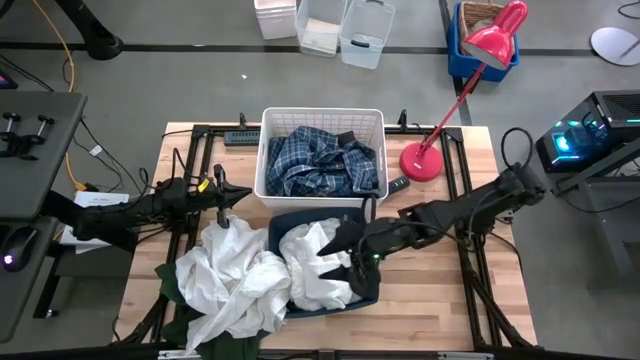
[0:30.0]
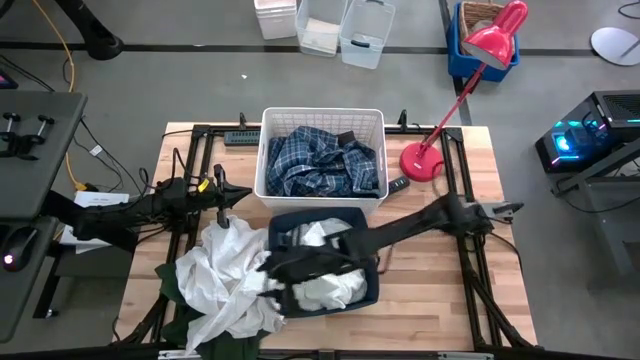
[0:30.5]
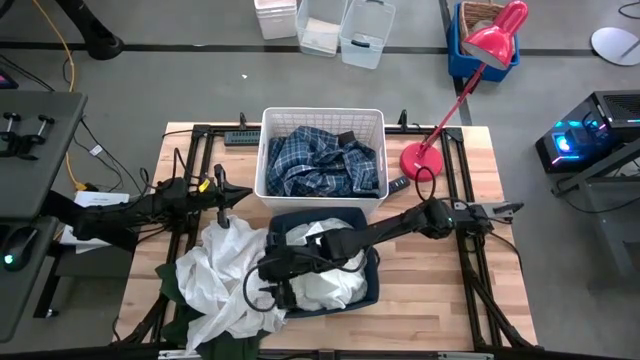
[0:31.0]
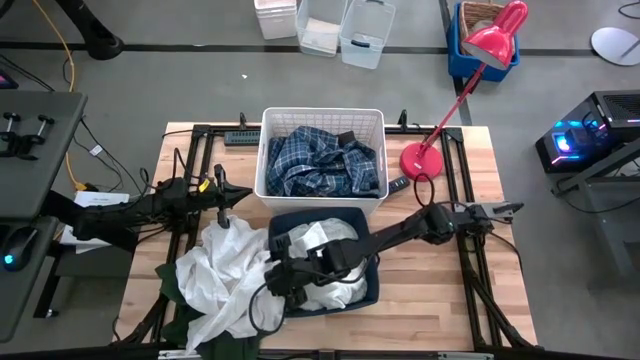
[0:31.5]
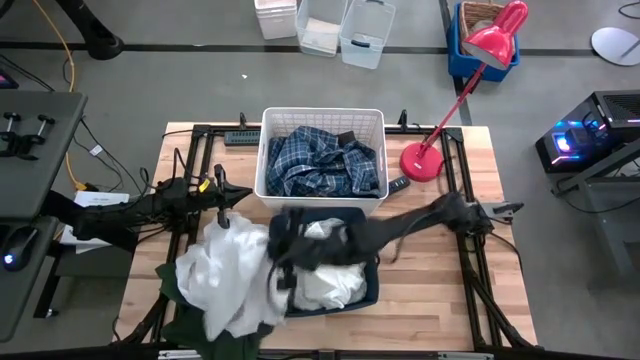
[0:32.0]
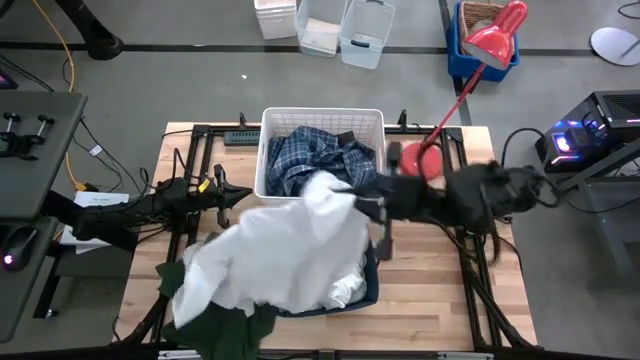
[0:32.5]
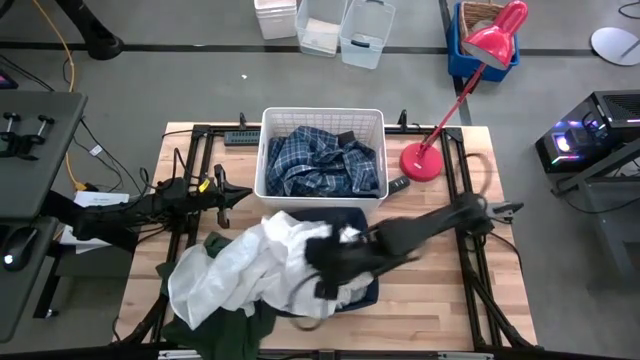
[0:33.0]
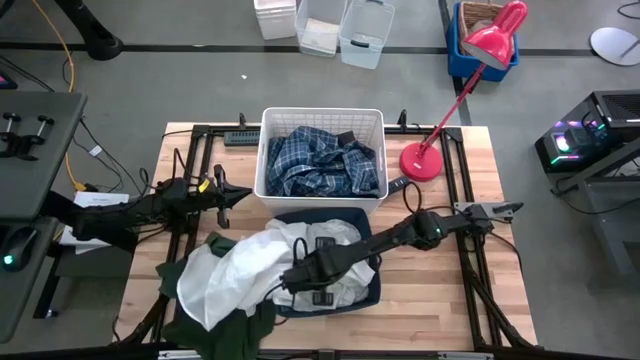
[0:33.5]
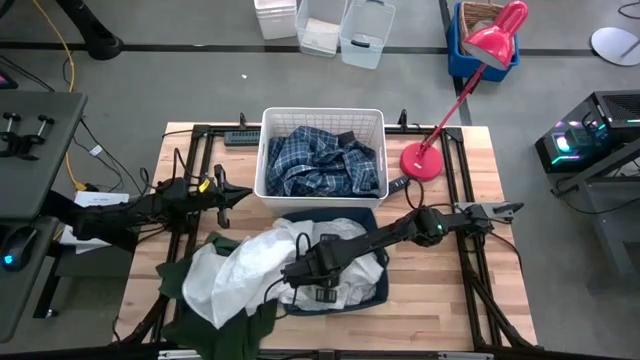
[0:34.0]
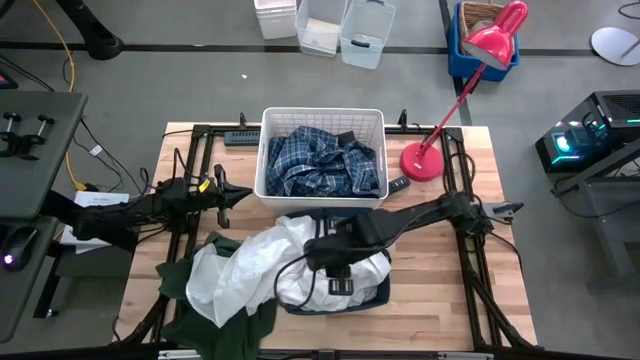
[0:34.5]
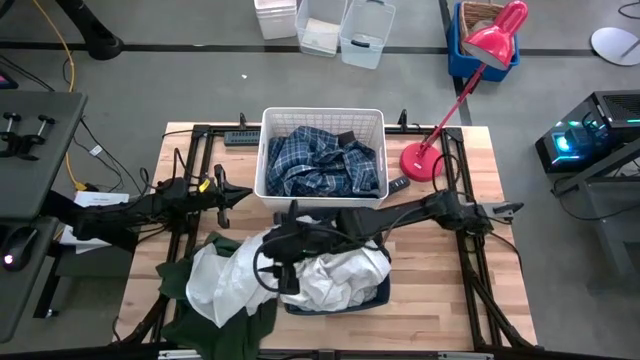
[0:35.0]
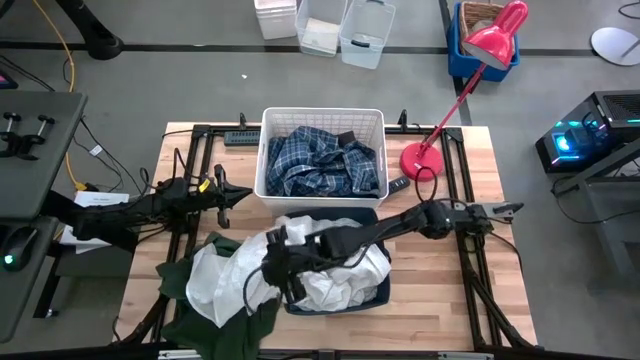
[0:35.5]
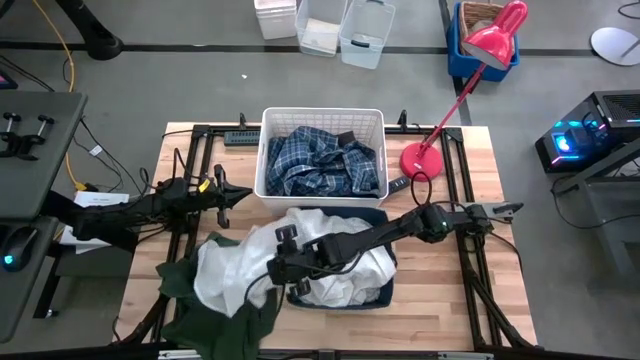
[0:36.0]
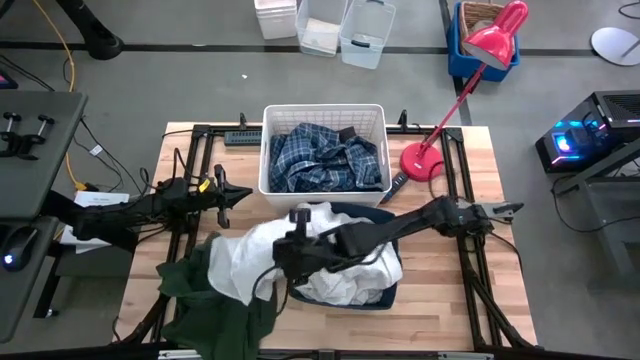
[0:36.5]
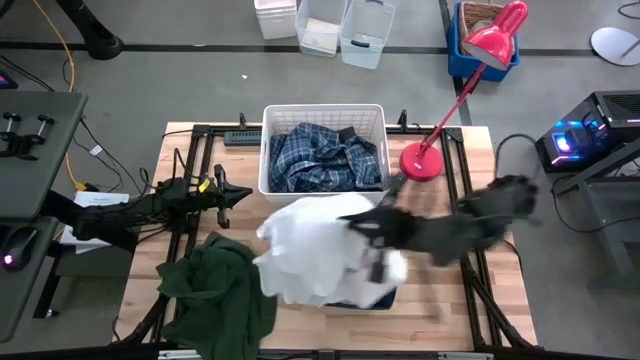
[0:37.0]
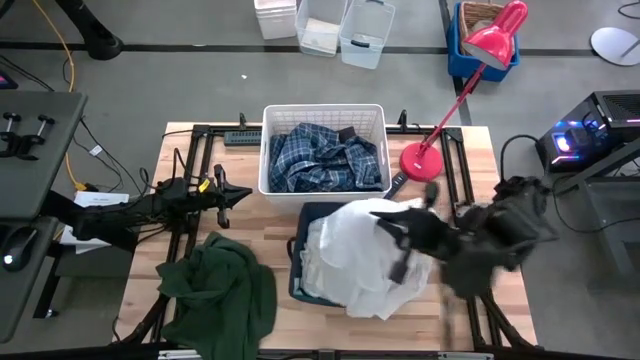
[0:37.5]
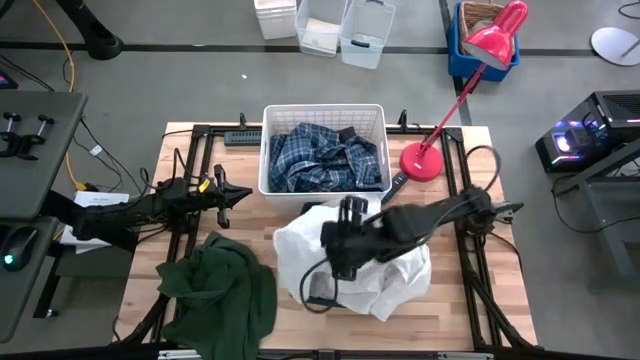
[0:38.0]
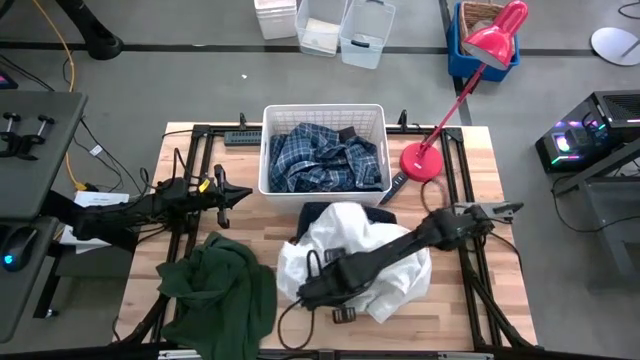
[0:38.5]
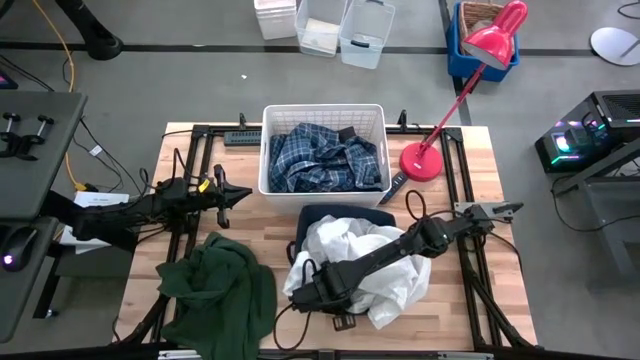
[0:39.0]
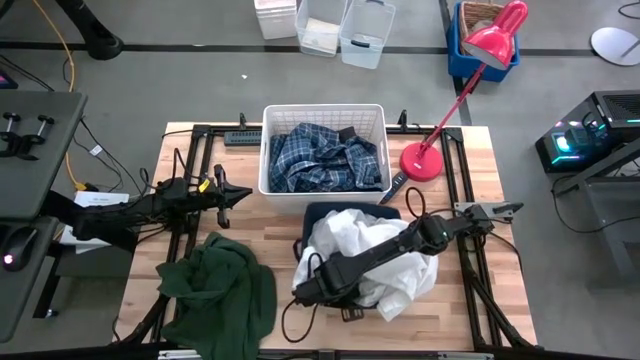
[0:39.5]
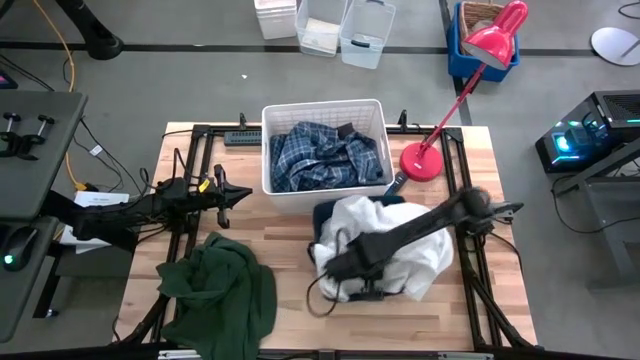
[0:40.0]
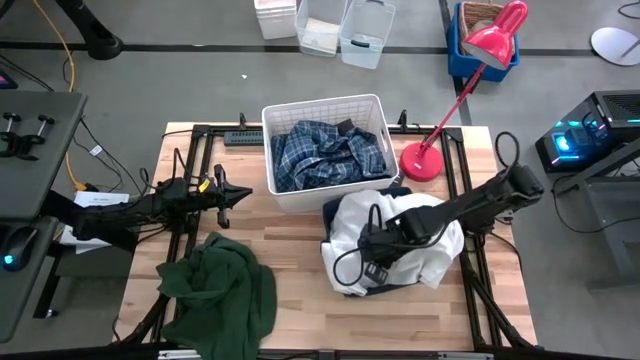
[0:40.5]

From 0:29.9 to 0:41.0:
Task: Sort clothes
Put the white shirt into the blue laundry bin

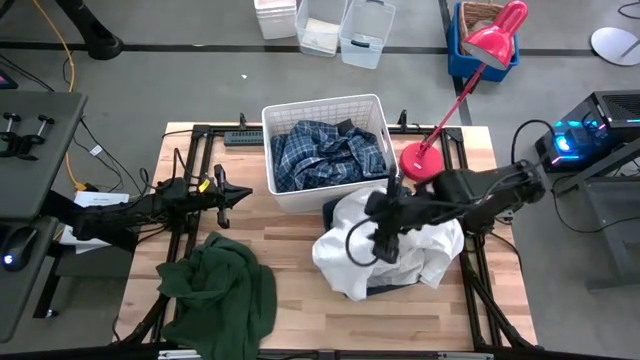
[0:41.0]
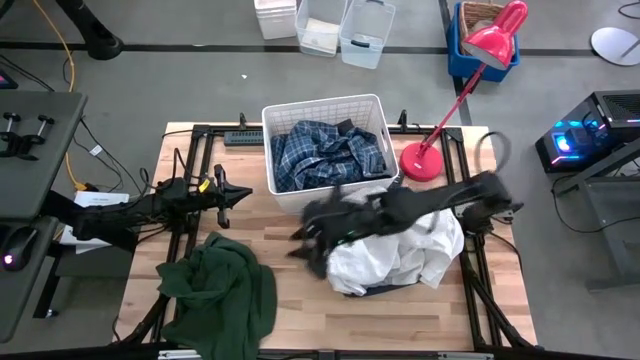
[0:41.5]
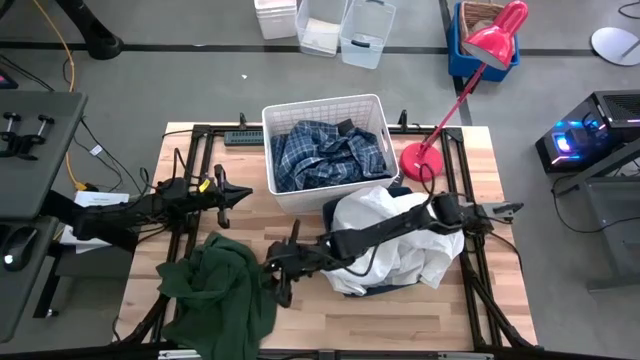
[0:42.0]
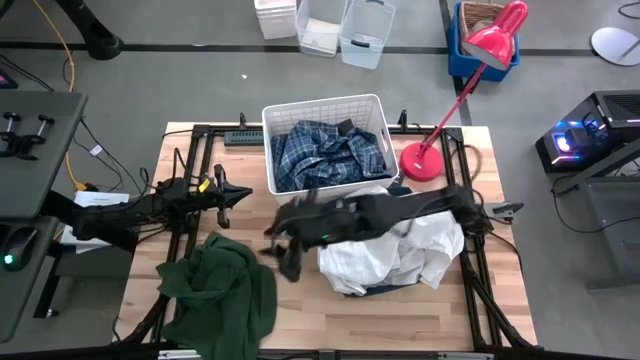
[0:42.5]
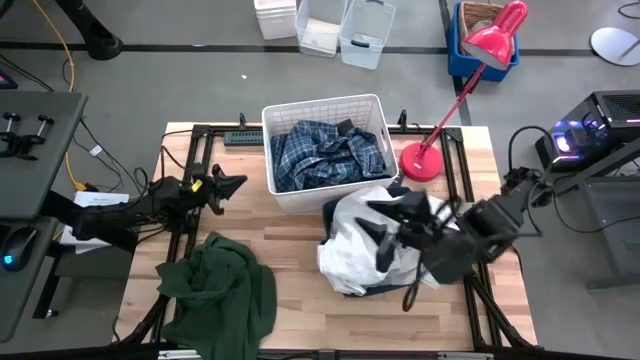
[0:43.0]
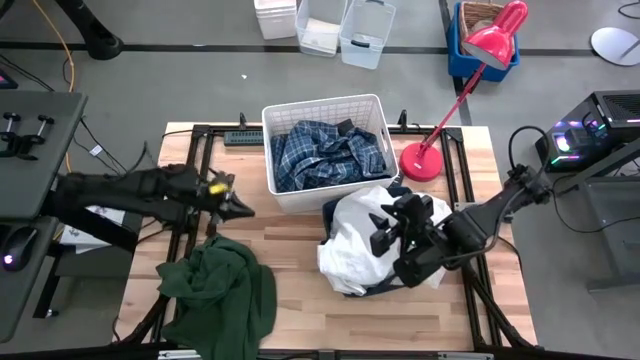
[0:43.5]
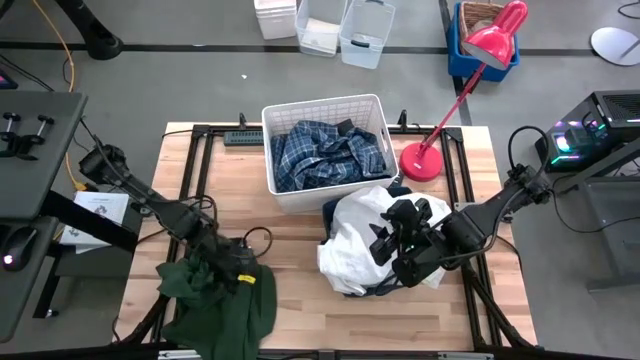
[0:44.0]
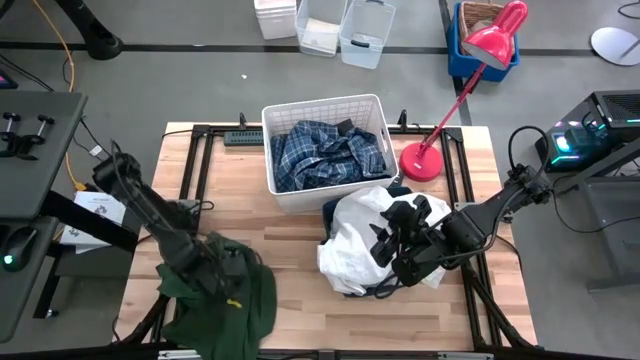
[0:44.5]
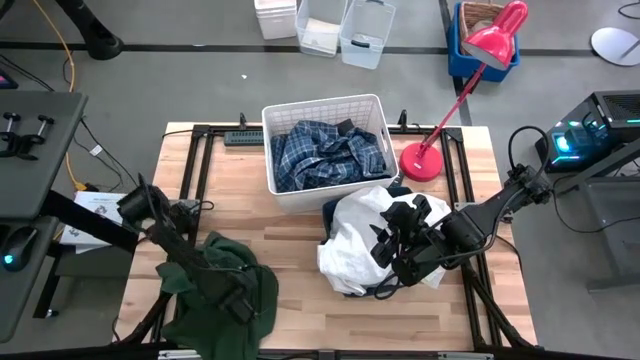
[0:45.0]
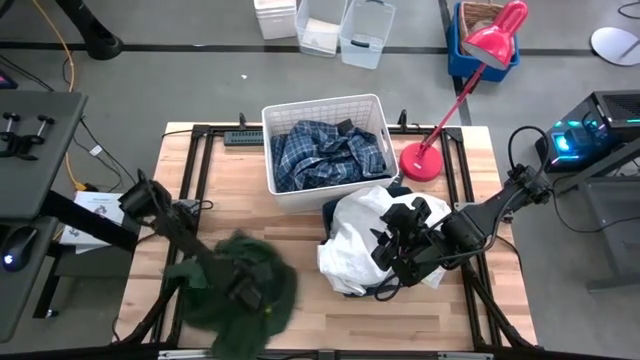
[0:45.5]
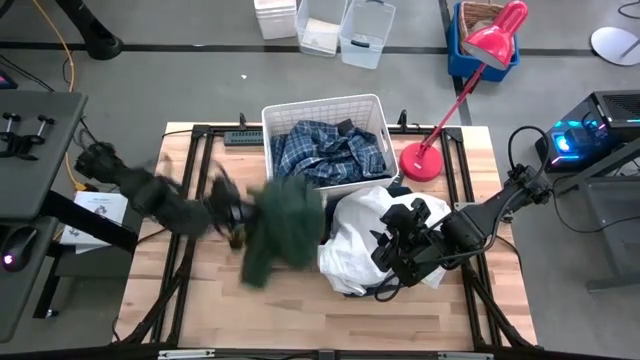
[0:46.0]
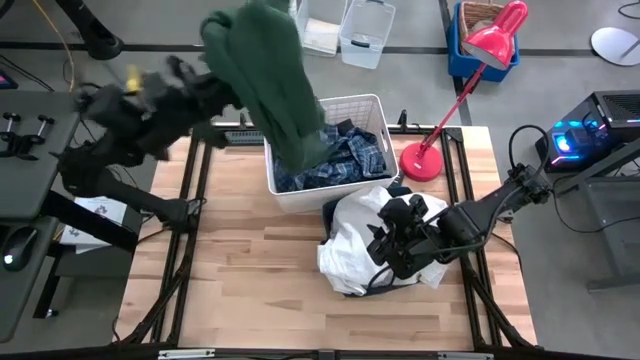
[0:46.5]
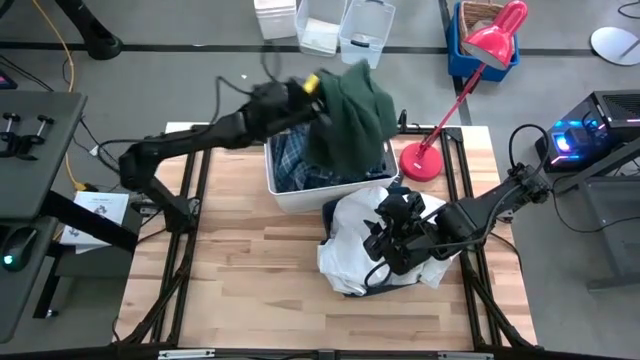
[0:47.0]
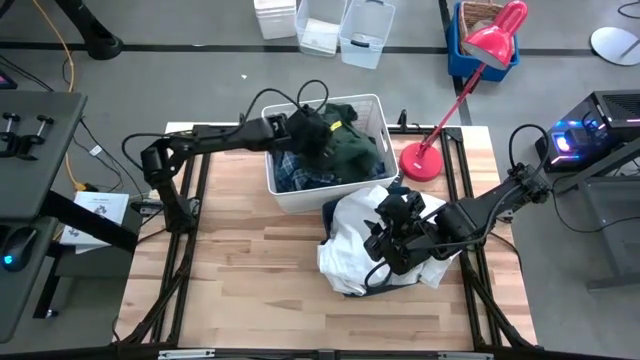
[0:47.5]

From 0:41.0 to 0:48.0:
Put the green polo shirt into the the white laundry bin

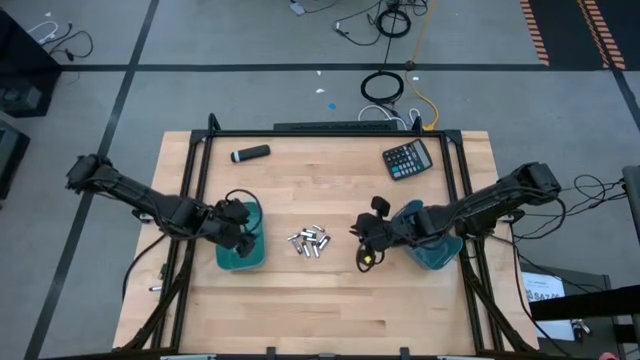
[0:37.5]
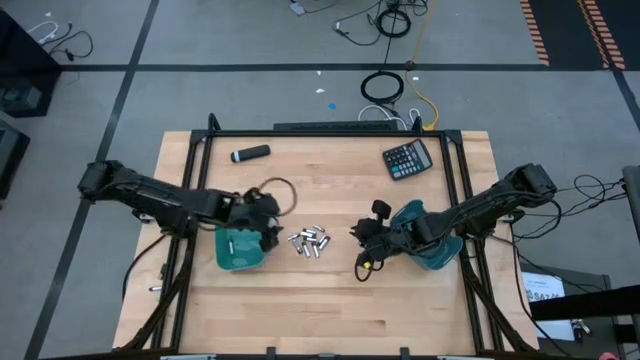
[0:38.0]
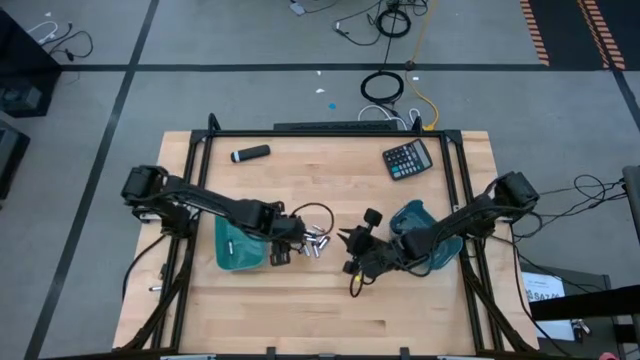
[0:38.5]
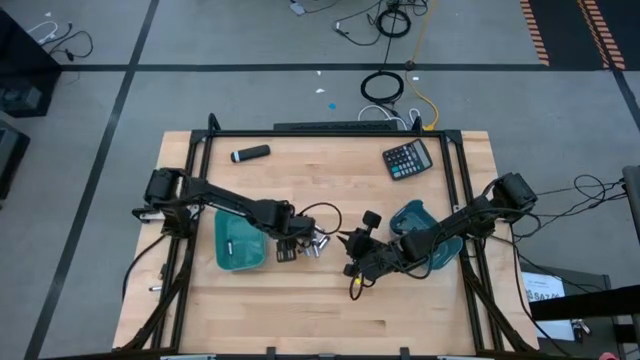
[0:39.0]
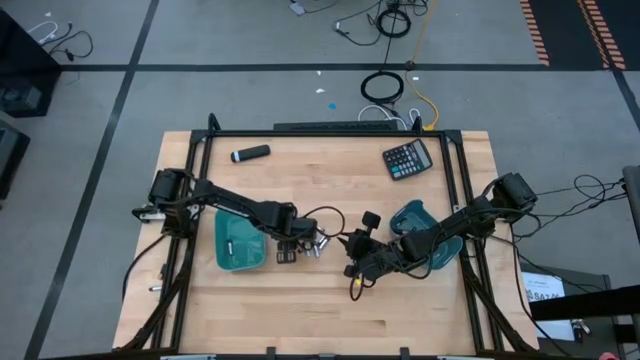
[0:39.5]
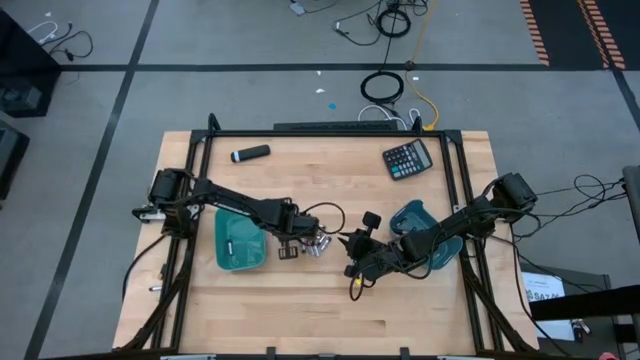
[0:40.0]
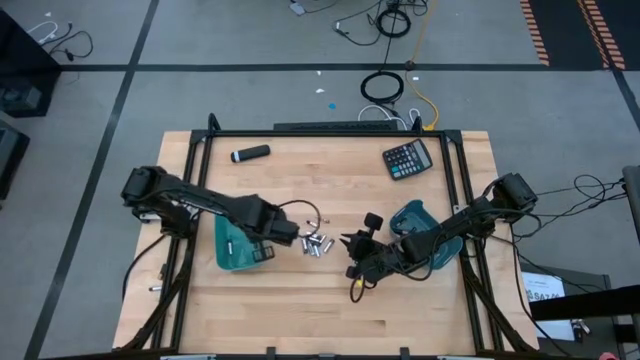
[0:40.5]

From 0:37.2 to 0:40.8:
Task: Sort batteries
Put the silver battery into the light blue bin
